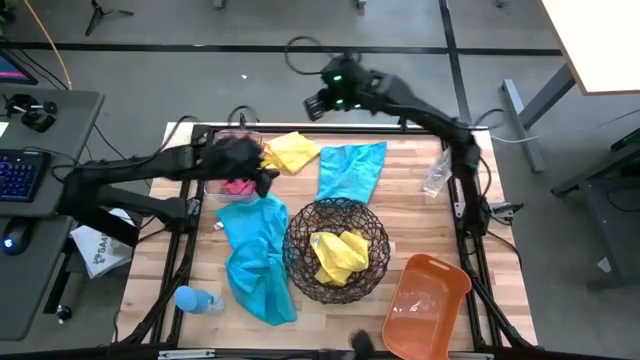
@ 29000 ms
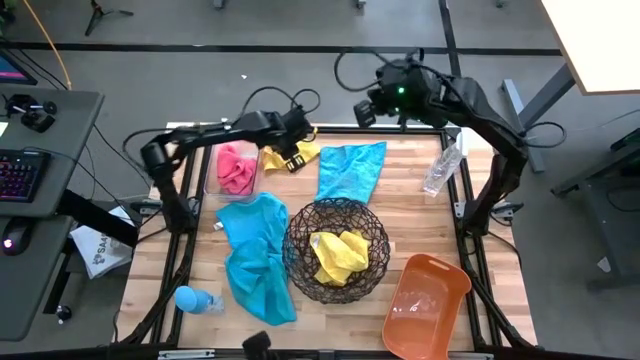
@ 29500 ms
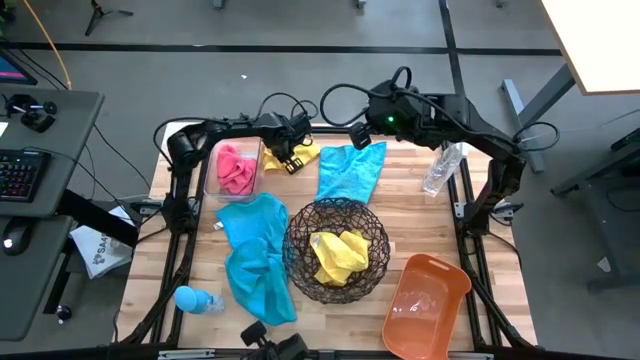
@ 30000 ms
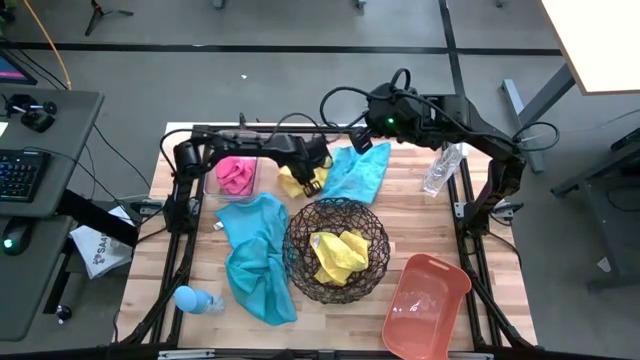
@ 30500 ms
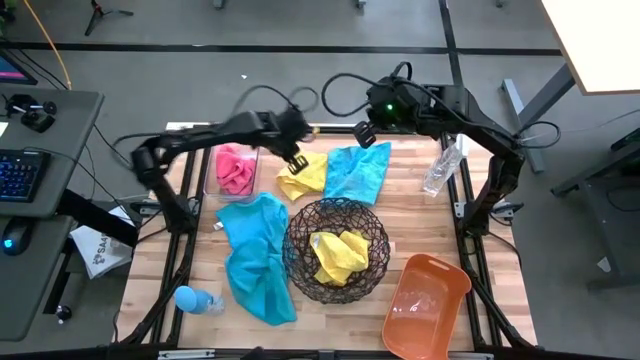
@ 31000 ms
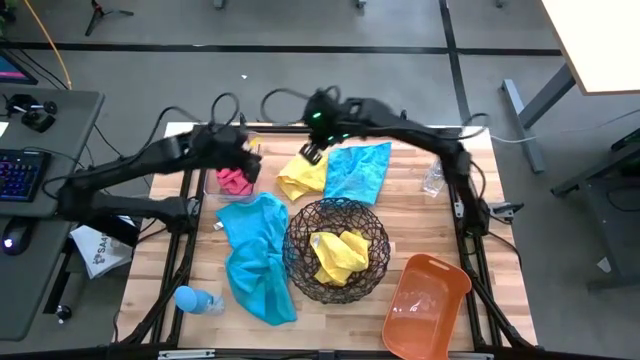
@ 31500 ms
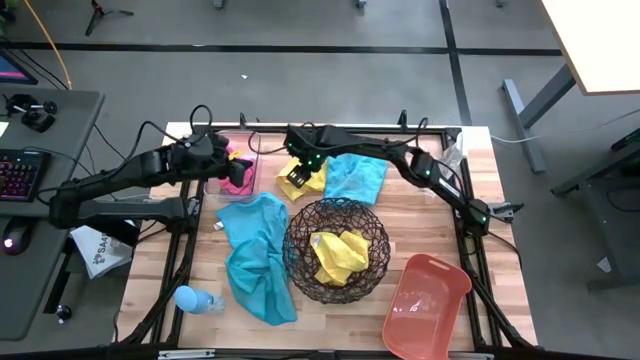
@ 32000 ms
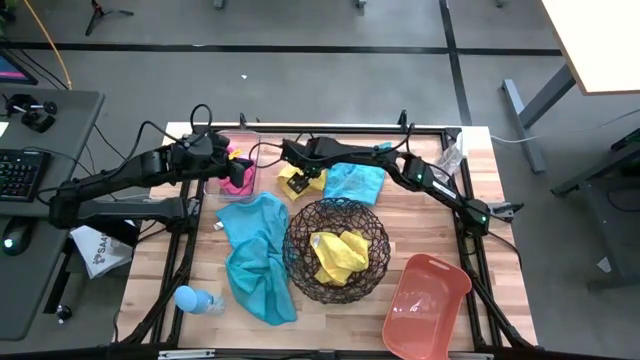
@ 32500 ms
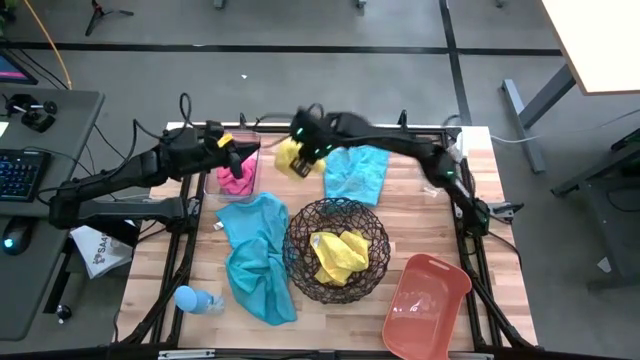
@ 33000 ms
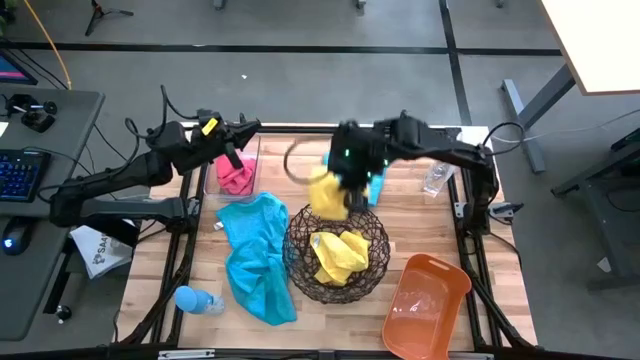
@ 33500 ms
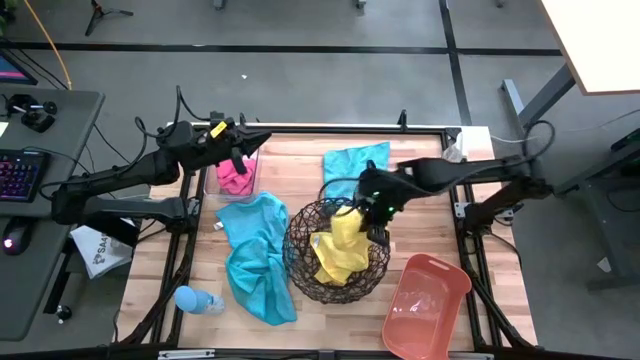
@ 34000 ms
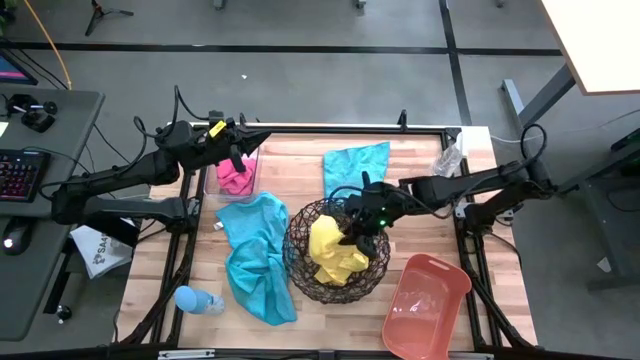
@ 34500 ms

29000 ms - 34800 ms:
Task: Sort microfiber towel by color & place in baskets
Put the yellow towel into the black basket

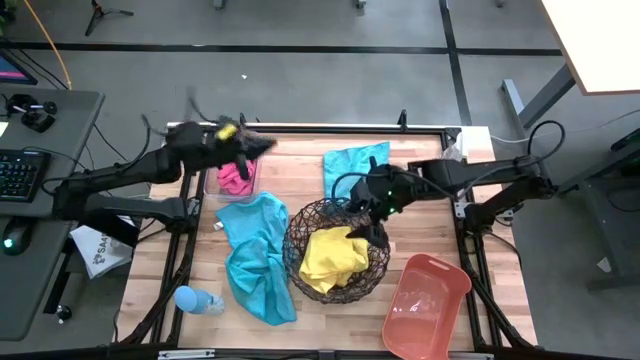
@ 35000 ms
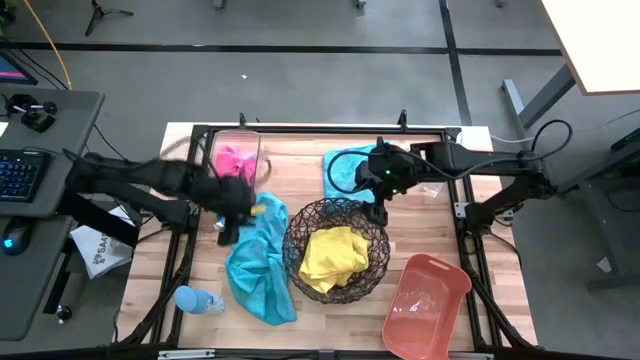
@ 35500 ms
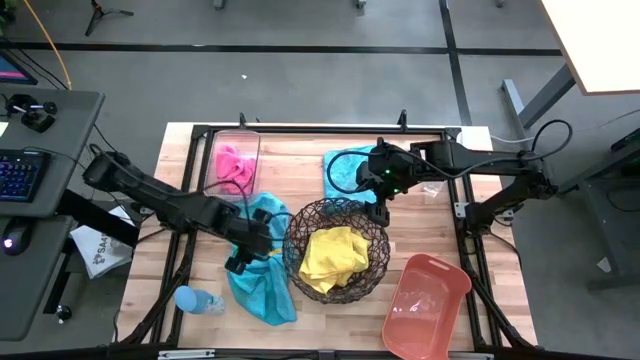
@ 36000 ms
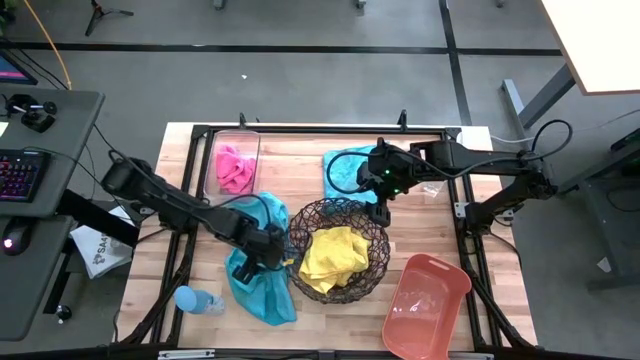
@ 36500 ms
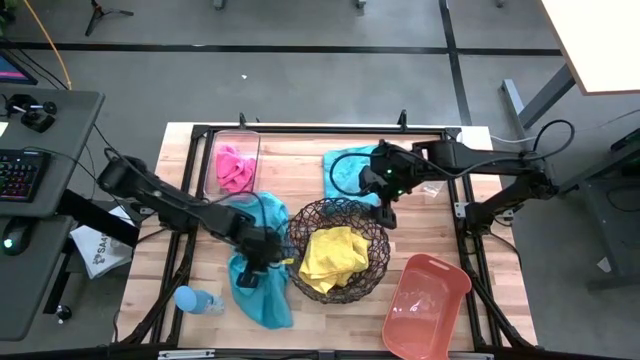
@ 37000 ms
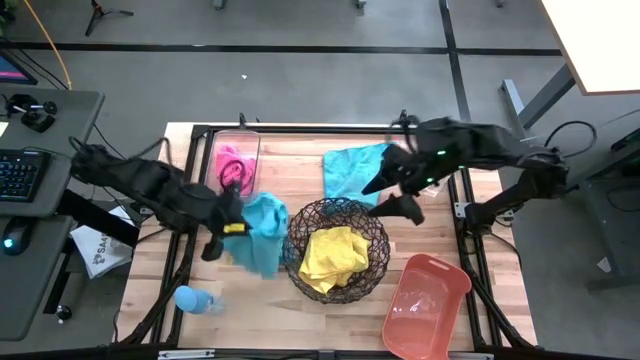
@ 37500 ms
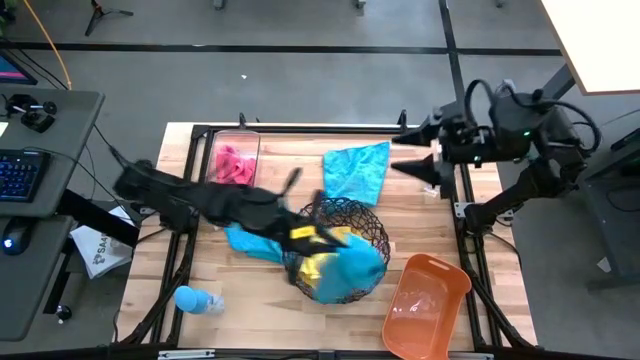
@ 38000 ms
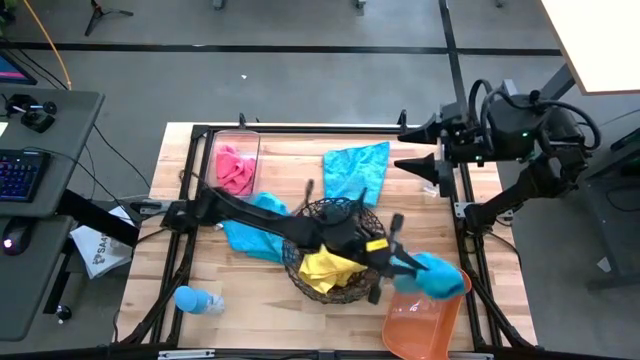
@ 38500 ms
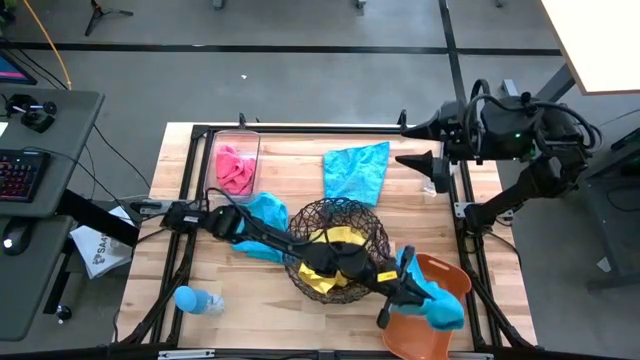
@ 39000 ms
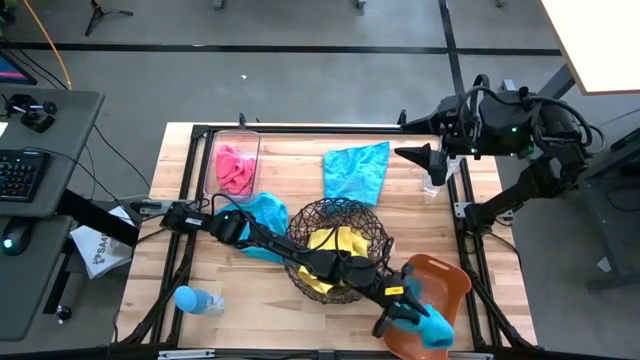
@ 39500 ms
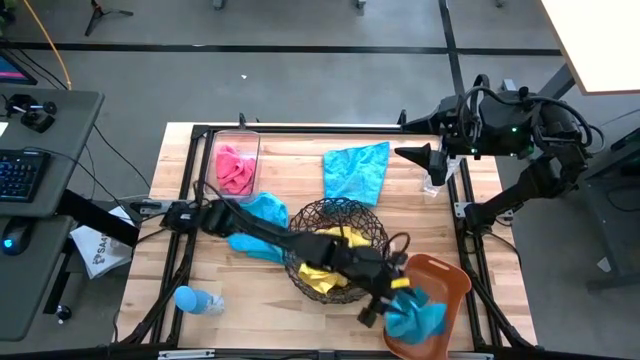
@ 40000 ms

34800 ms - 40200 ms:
Put the bottom left blue towel into the orange bin

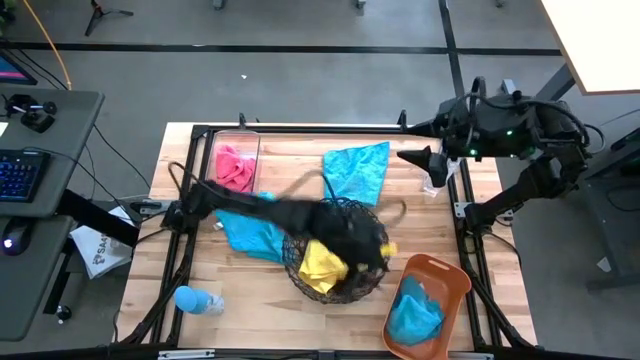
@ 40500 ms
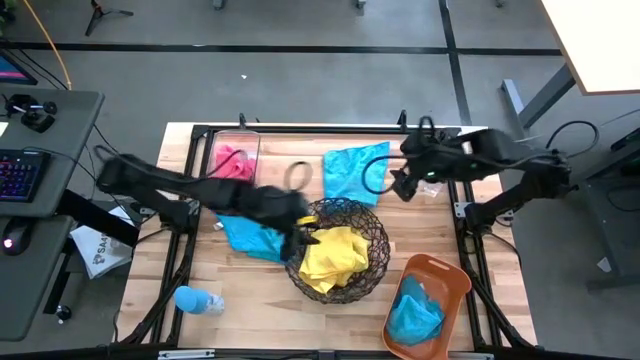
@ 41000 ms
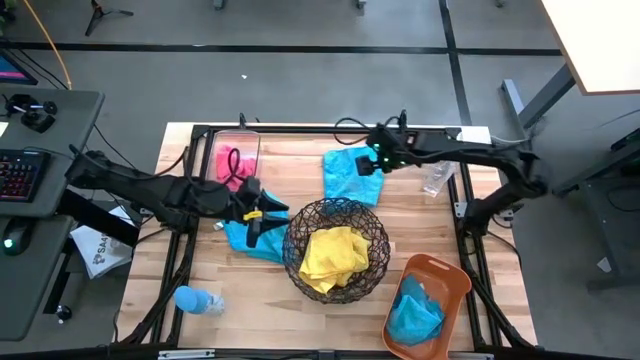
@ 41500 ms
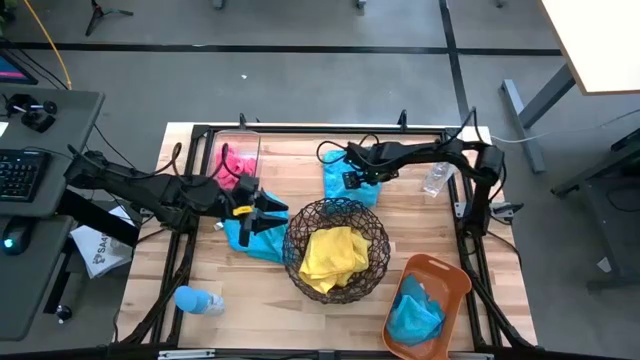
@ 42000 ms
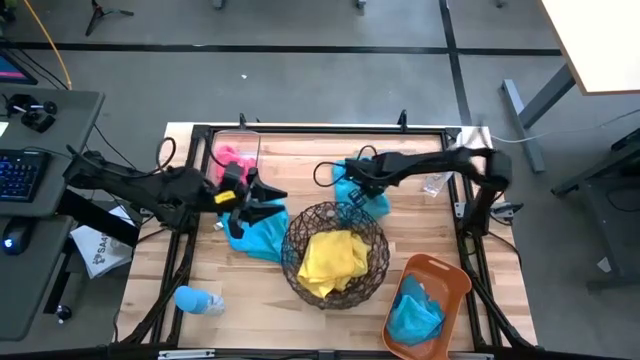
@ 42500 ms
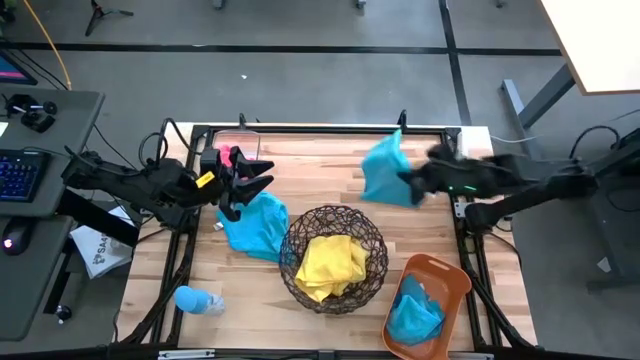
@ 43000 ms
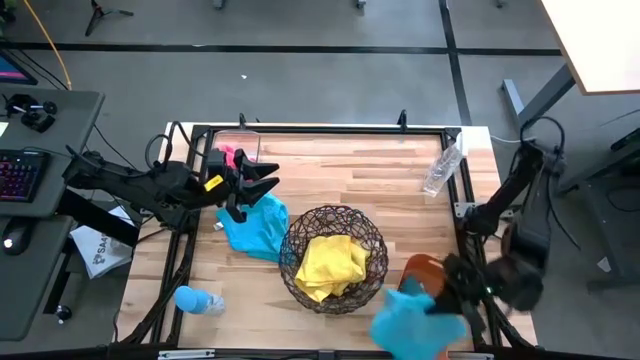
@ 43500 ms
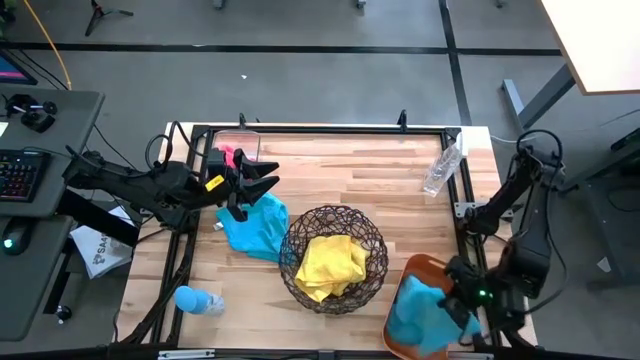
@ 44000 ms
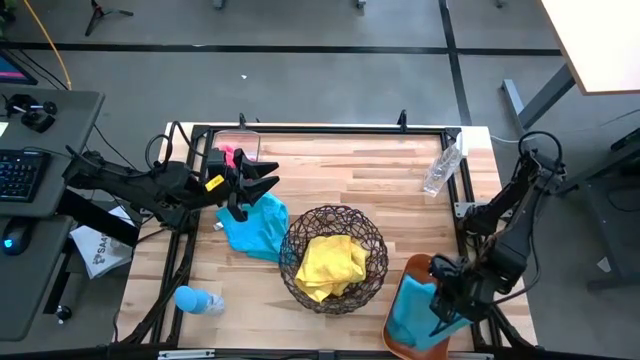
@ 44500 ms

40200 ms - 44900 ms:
Put the right blue towel into the orange bin

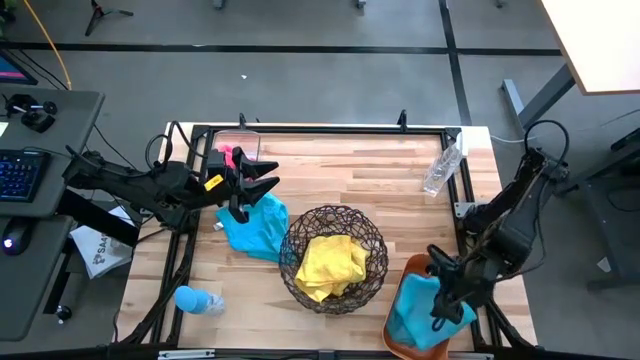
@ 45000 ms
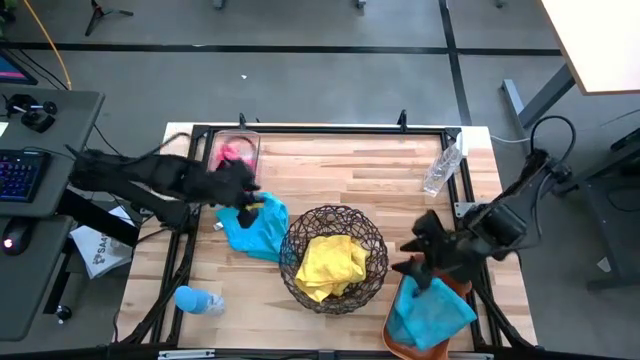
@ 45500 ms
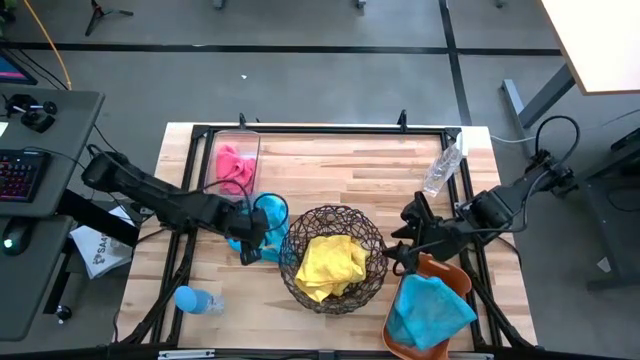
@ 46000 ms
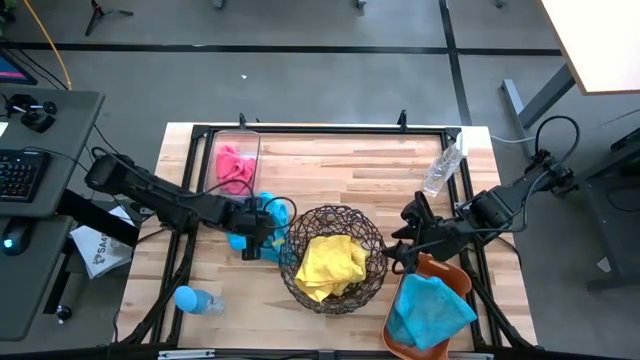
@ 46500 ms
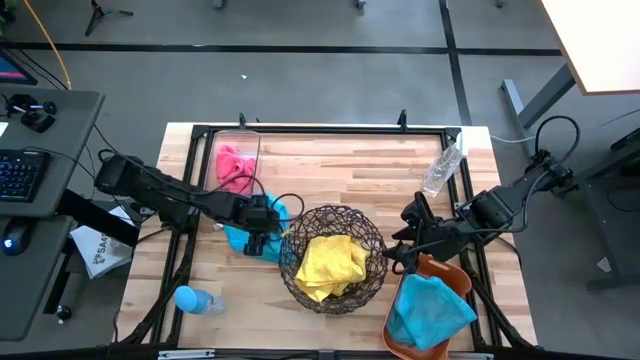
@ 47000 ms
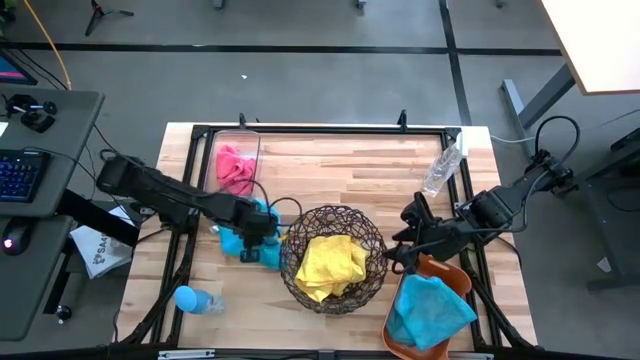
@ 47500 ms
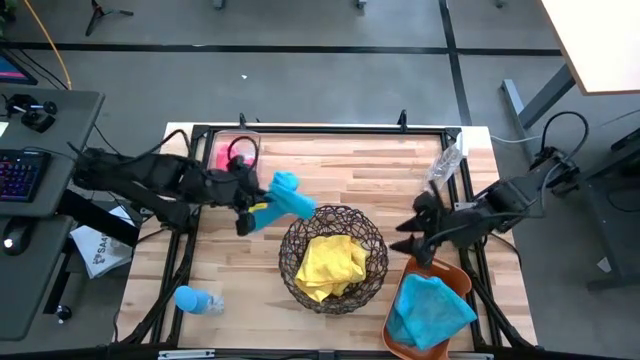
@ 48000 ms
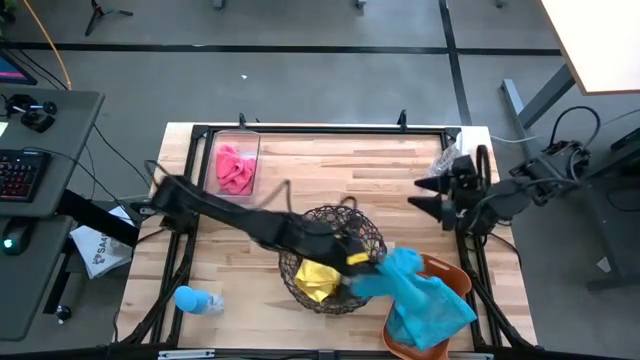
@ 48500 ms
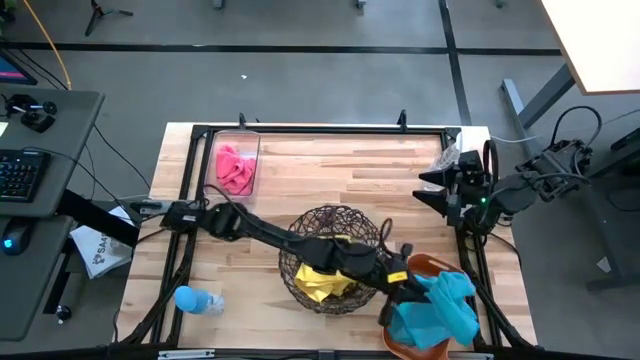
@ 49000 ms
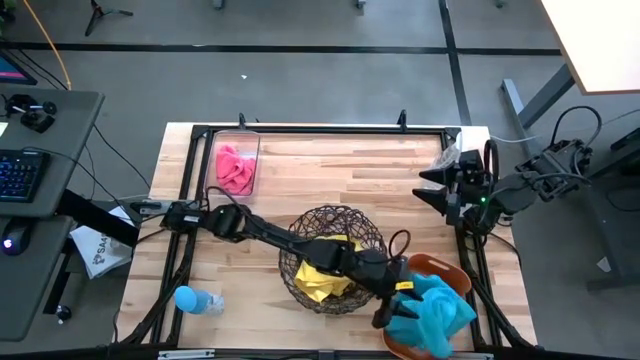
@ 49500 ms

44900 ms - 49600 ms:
Put the blue towel into the orange bin
